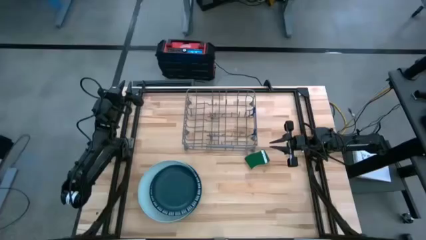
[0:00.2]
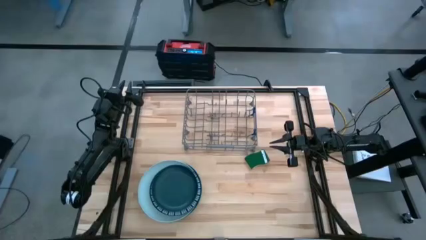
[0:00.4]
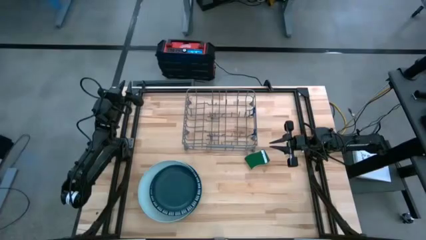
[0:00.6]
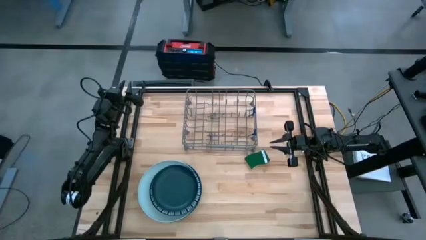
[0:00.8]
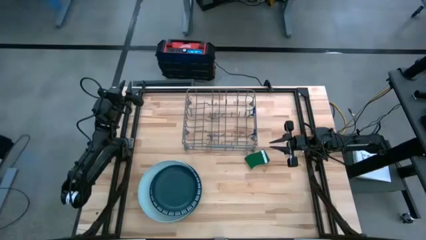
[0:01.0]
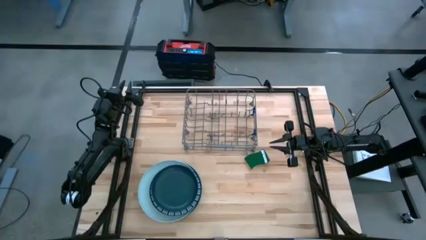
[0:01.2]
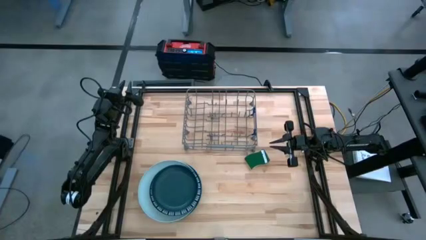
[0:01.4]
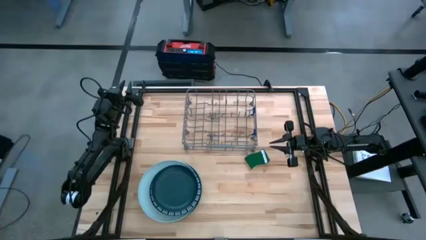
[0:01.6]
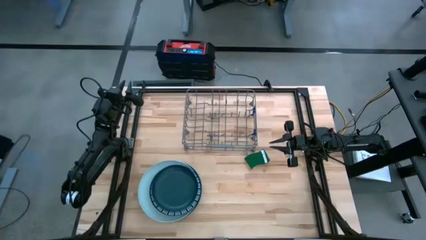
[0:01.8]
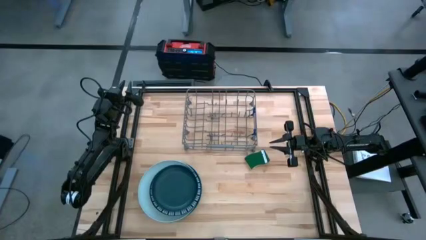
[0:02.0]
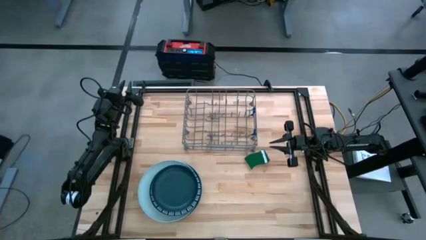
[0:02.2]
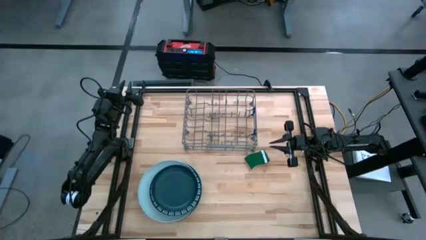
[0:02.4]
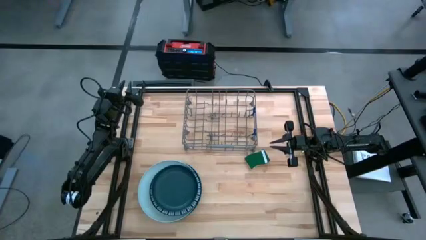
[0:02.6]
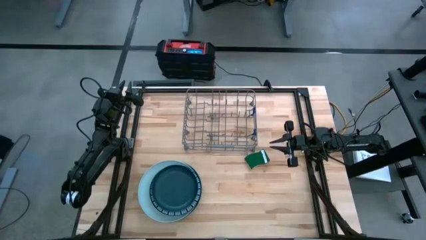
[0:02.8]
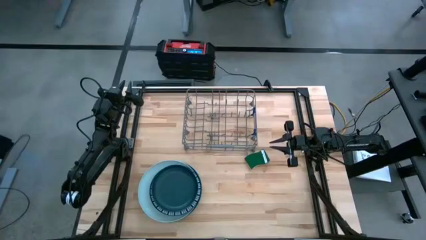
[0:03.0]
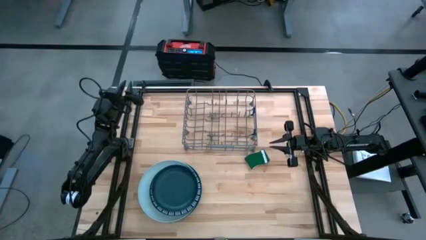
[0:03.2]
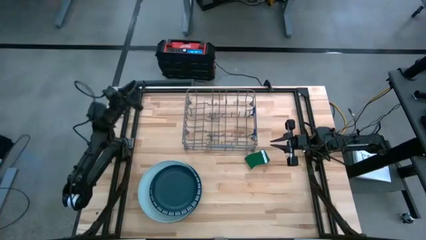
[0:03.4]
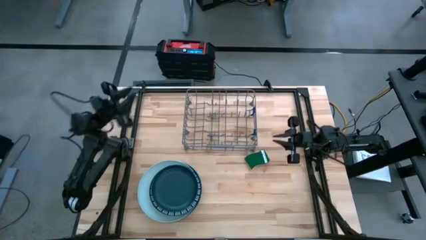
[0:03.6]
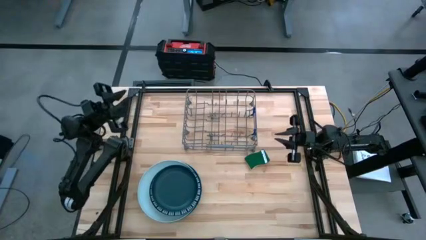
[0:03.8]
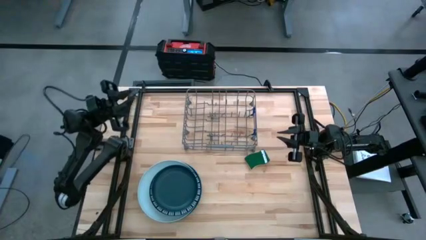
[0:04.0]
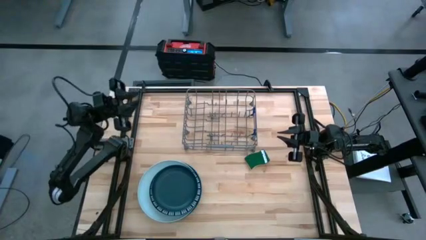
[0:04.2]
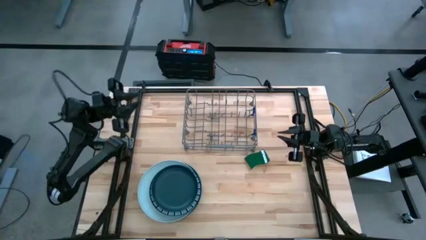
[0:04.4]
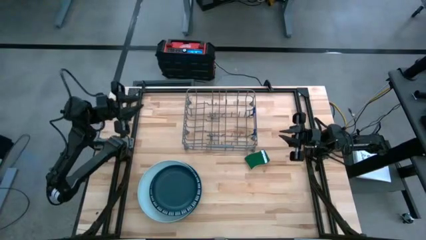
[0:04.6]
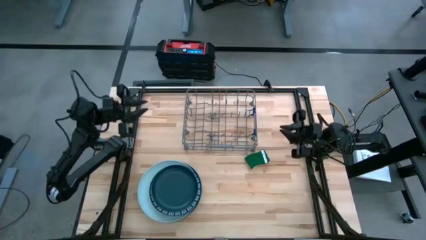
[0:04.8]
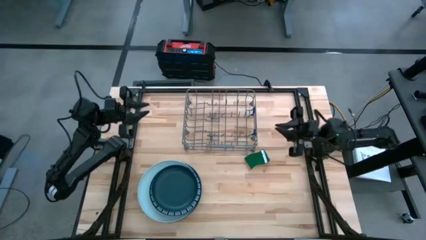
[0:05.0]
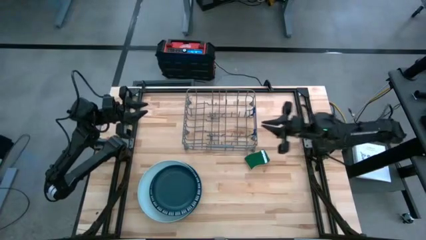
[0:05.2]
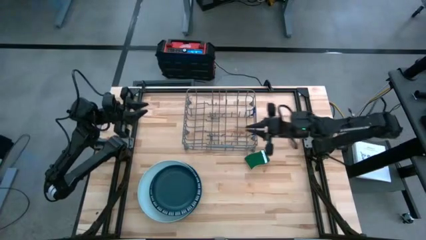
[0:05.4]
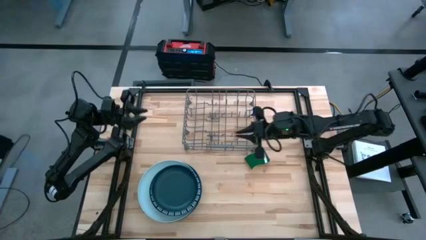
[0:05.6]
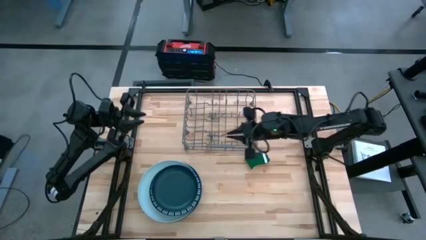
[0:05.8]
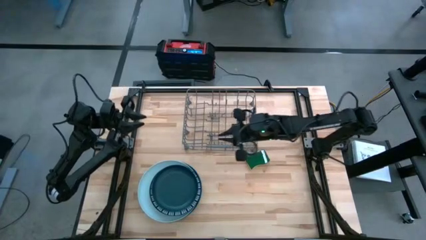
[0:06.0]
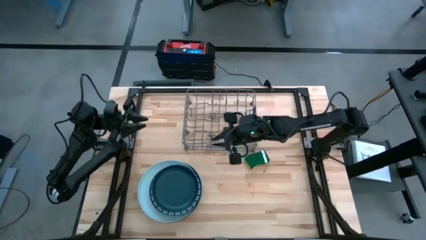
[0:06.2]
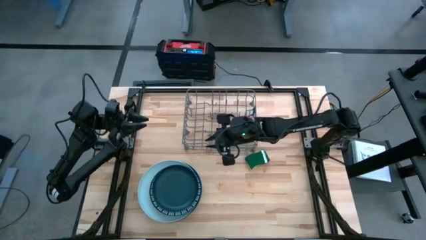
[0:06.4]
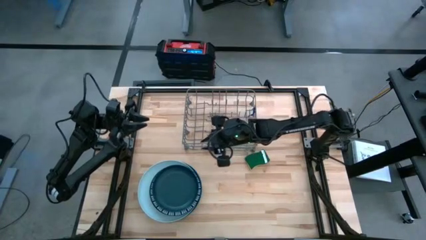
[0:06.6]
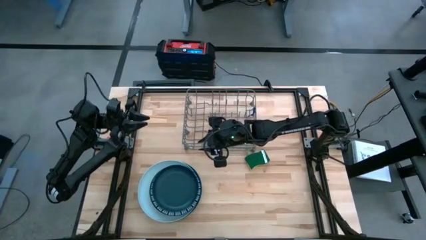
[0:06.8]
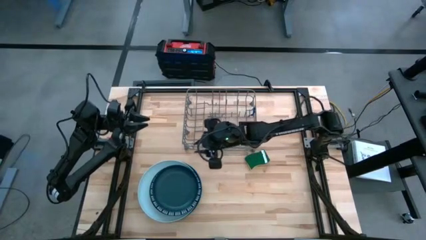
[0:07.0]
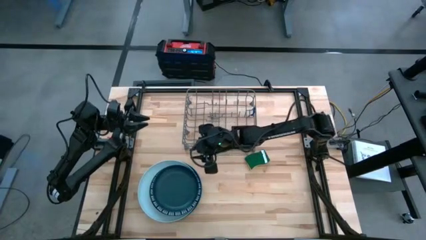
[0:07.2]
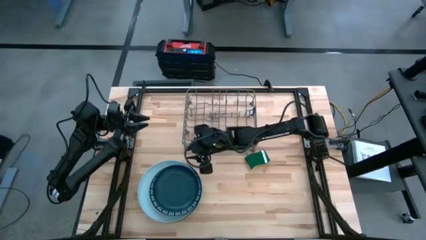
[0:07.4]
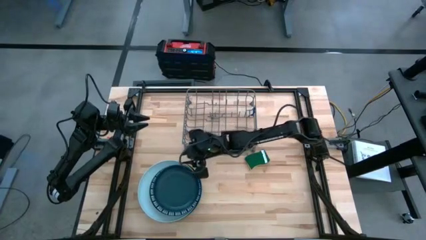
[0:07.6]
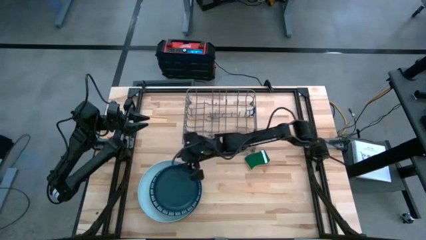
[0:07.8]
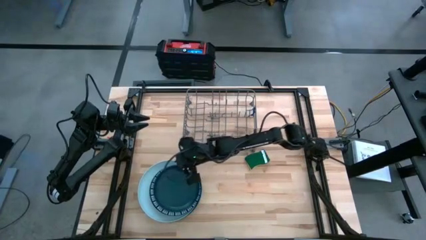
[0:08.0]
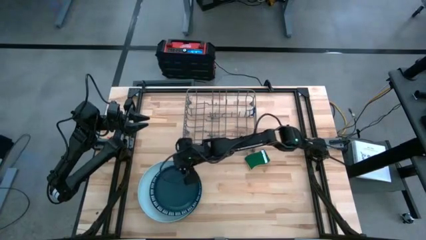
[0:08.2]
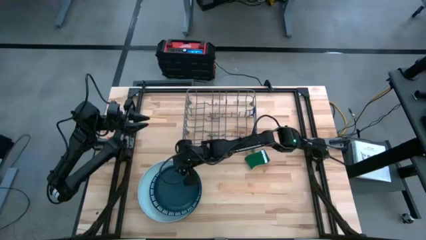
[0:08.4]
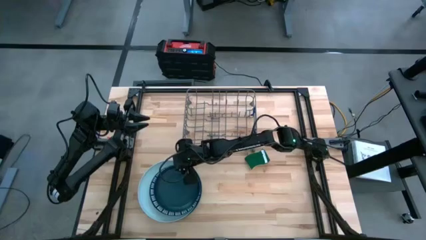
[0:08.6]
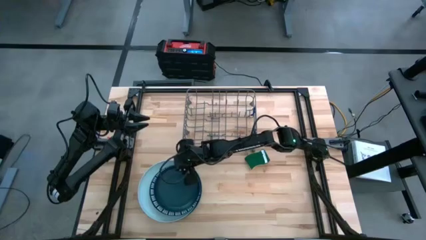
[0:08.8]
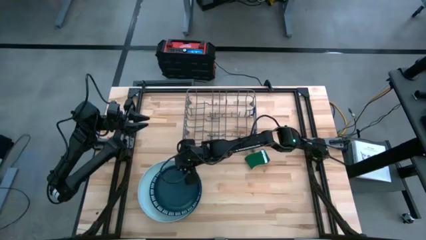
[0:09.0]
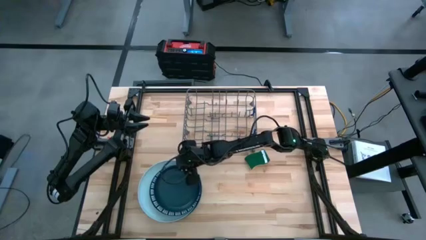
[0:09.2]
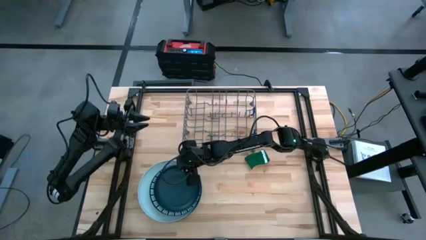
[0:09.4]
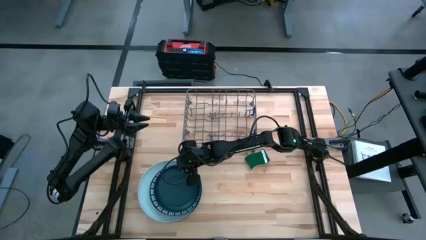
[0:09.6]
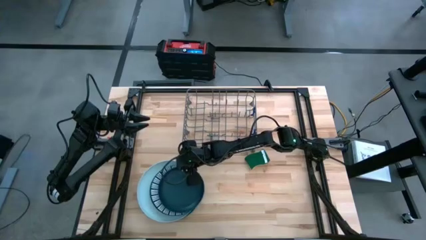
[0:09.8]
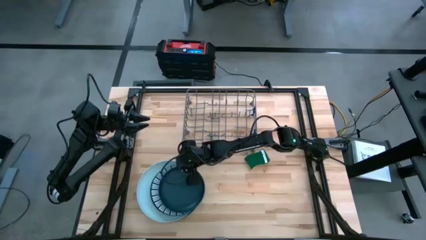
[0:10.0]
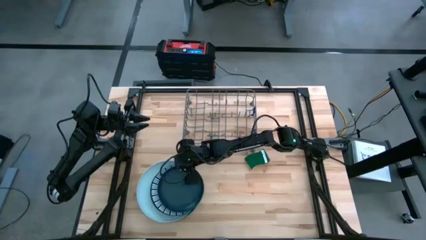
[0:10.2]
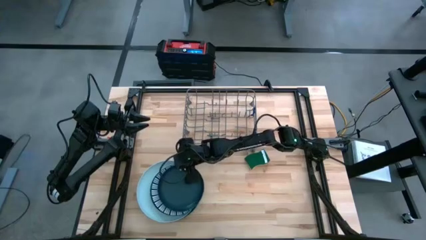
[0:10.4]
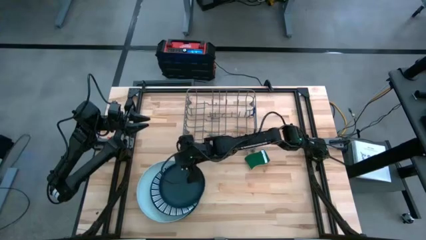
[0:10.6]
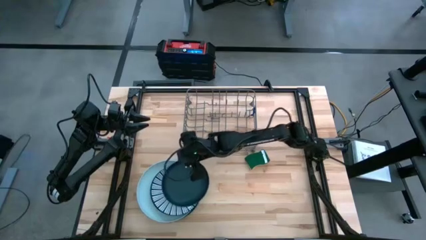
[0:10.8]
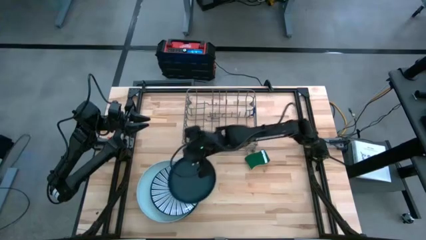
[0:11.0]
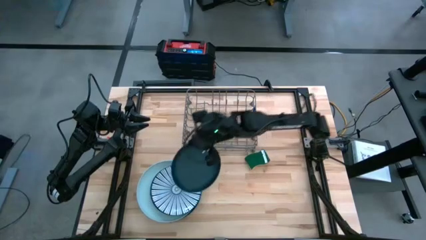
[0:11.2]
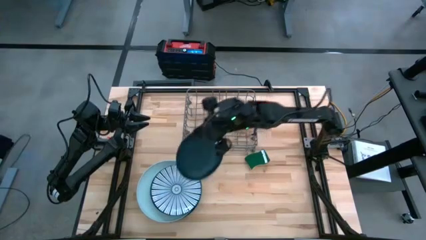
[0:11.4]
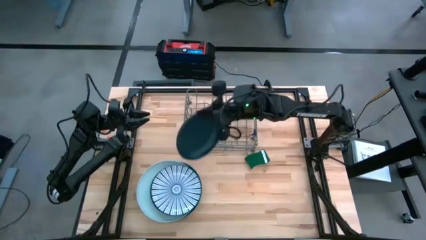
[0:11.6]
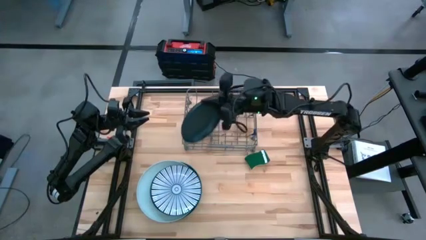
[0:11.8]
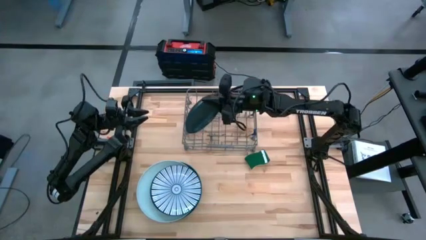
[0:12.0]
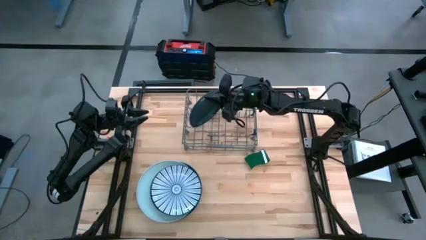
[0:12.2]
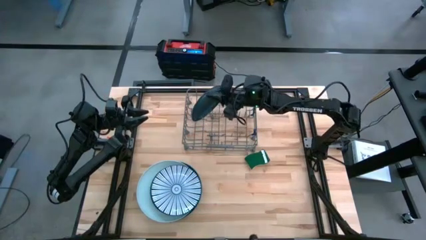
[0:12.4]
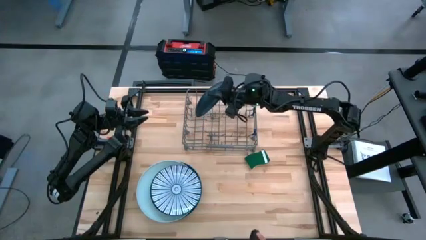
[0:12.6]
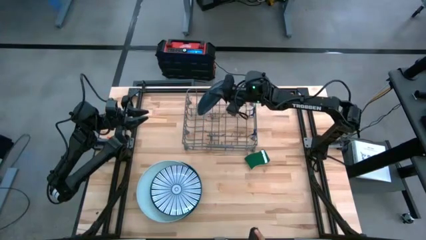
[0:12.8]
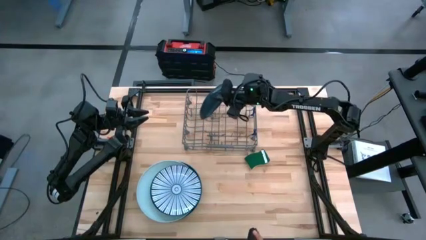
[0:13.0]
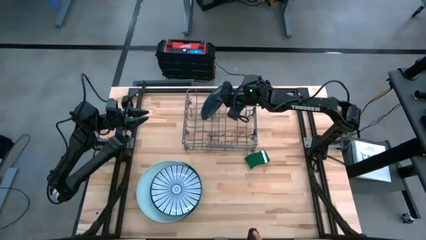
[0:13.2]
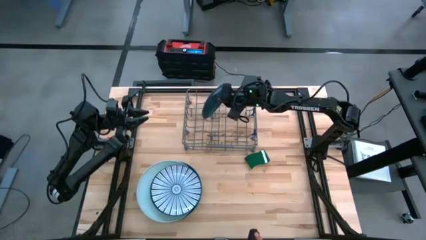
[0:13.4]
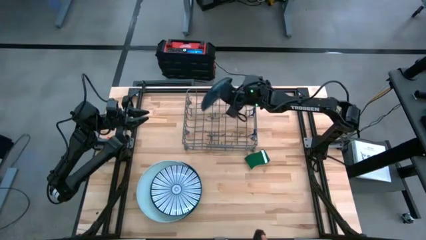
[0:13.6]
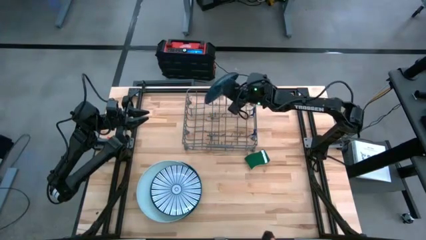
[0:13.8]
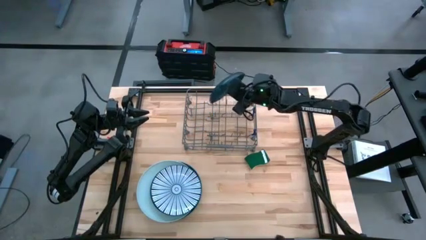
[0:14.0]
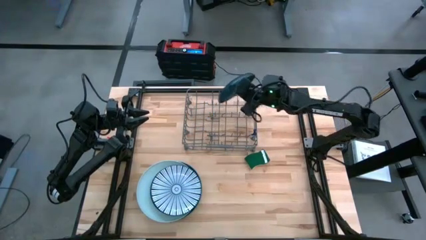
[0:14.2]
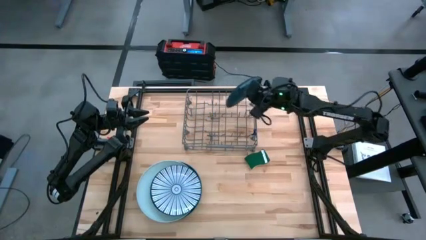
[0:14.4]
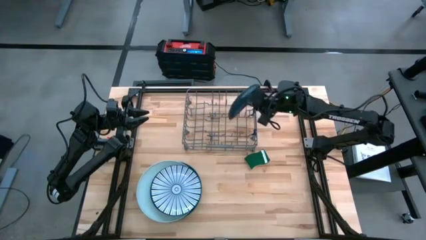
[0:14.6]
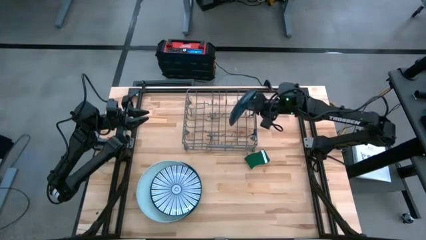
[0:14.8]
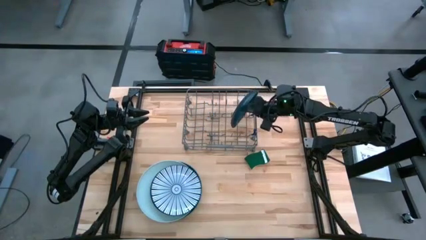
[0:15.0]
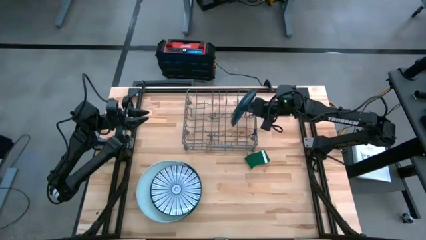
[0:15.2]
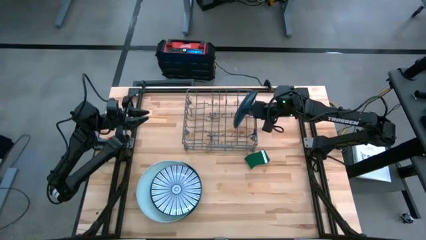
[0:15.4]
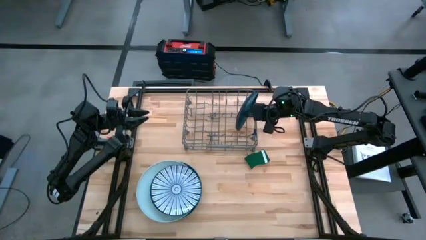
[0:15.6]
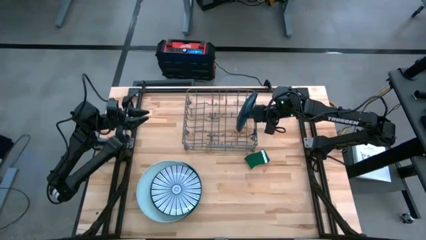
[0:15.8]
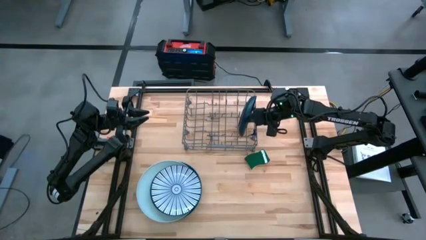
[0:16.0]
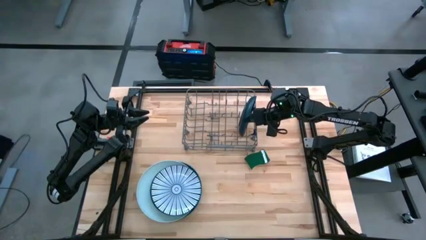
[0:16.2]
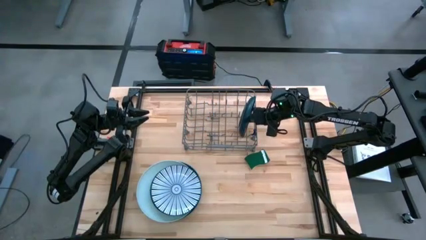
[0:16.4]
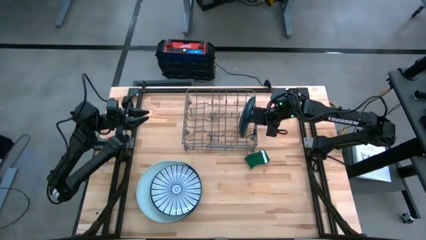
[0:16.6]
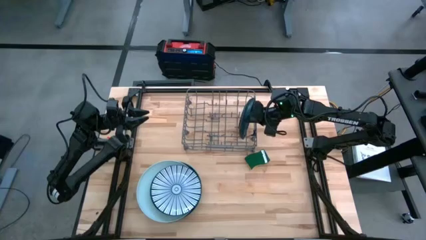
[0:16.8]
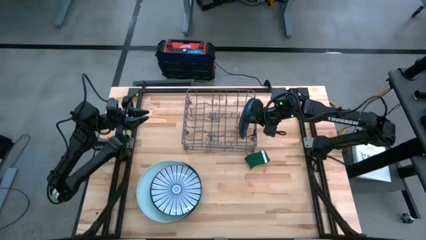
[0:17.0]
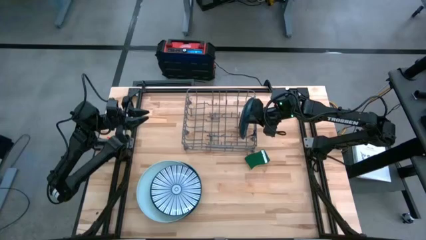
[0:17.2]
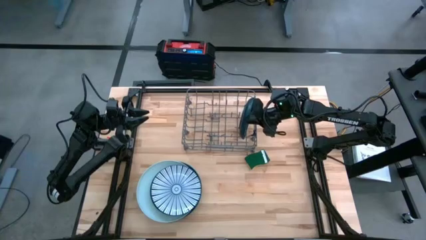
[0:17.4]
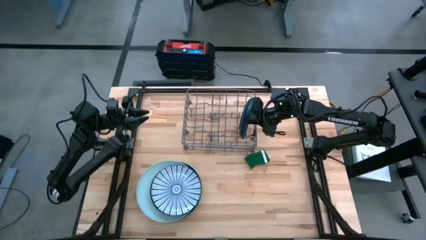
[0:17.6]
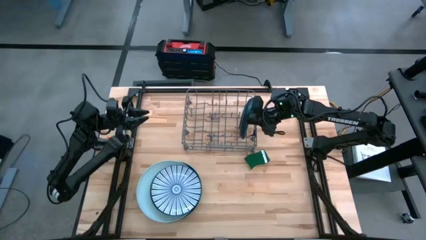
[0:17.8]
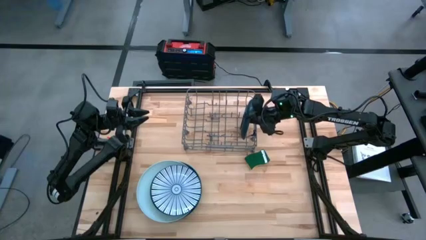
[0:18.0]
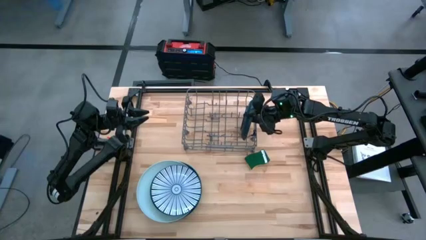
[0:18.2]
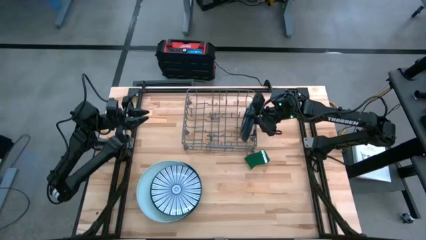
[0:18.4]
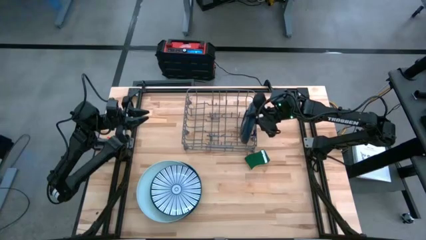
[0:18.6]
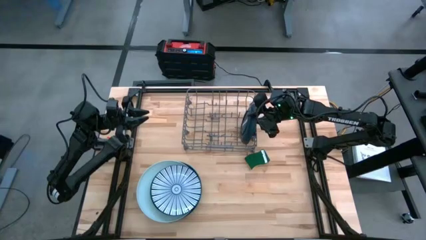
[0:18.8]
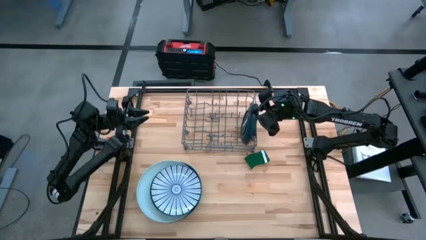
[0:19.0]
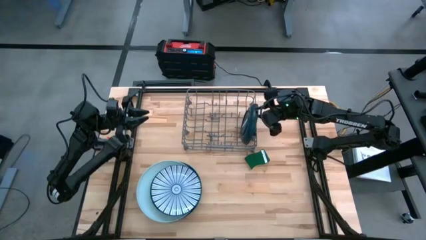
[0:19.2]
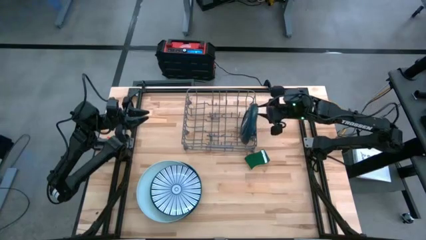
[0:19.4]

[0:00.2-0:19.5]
Task: Sort dishes
Put the dark green plate into the dish rack
